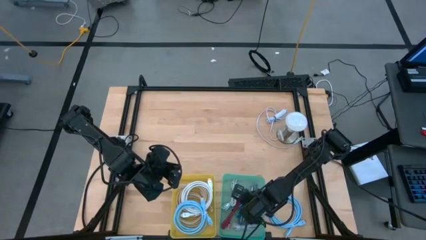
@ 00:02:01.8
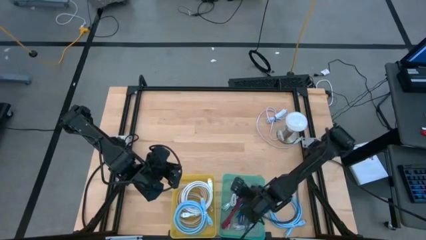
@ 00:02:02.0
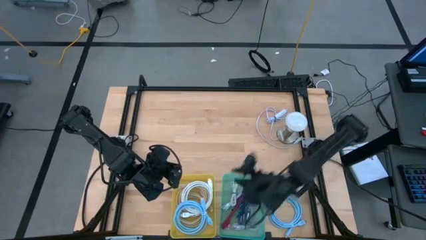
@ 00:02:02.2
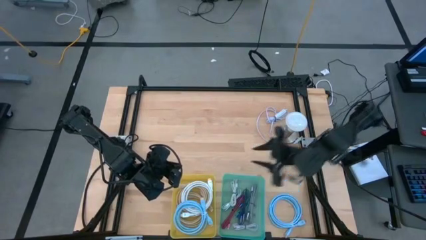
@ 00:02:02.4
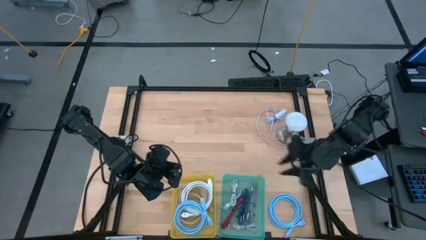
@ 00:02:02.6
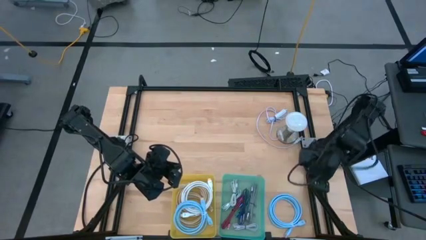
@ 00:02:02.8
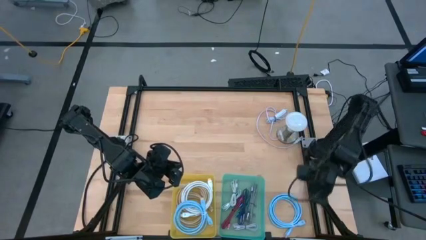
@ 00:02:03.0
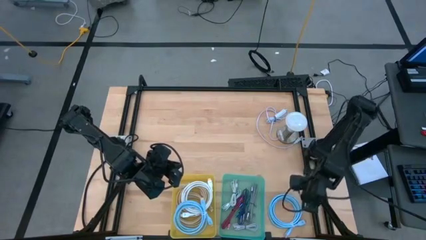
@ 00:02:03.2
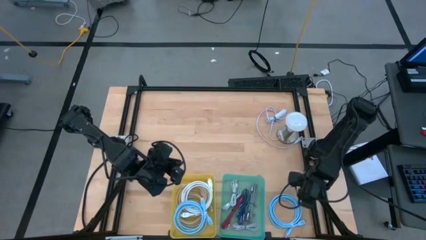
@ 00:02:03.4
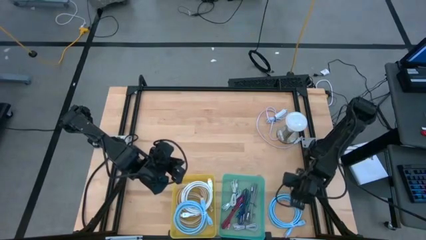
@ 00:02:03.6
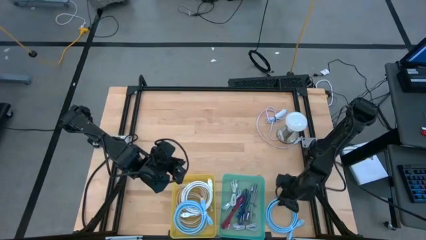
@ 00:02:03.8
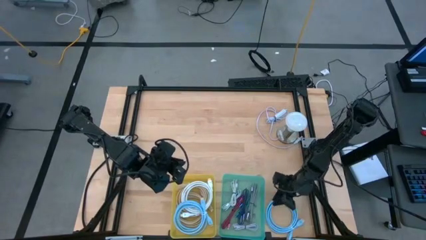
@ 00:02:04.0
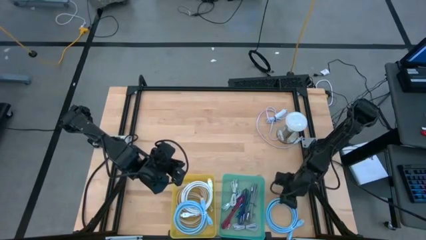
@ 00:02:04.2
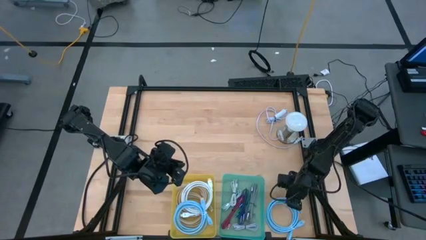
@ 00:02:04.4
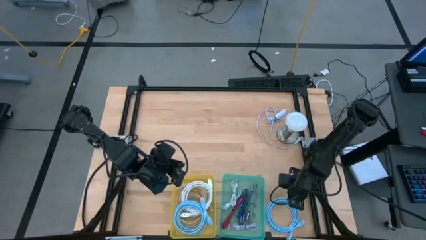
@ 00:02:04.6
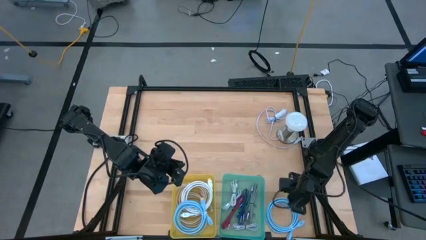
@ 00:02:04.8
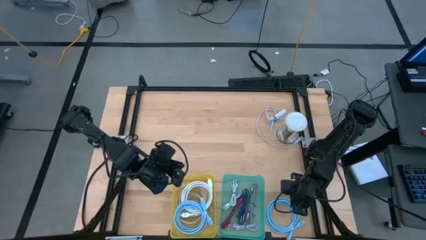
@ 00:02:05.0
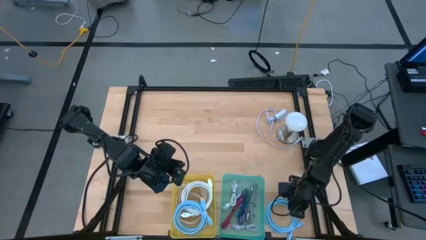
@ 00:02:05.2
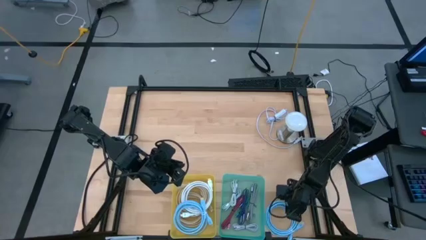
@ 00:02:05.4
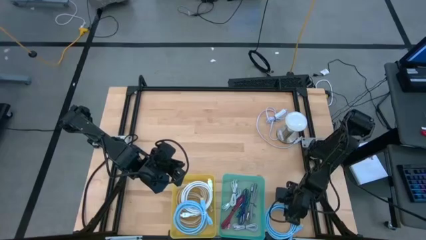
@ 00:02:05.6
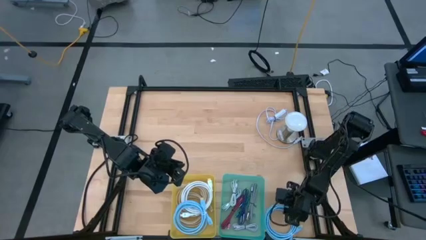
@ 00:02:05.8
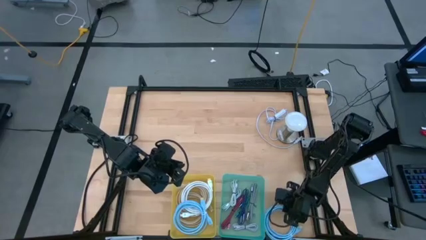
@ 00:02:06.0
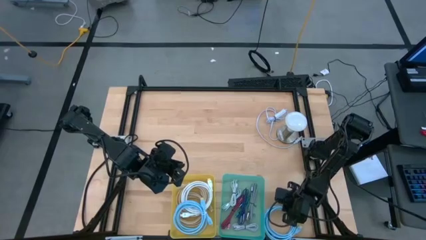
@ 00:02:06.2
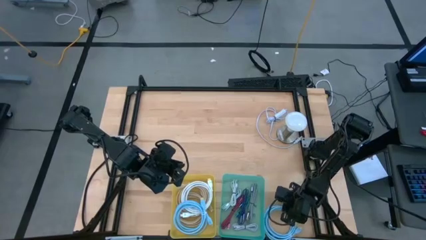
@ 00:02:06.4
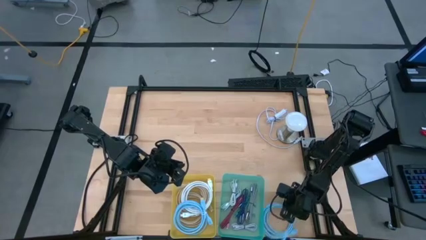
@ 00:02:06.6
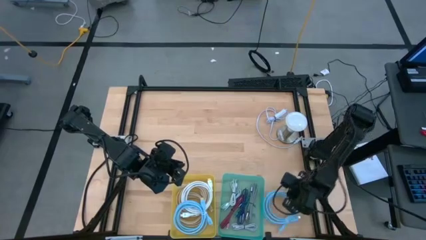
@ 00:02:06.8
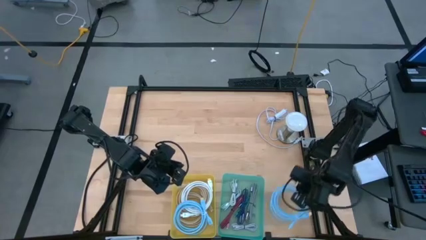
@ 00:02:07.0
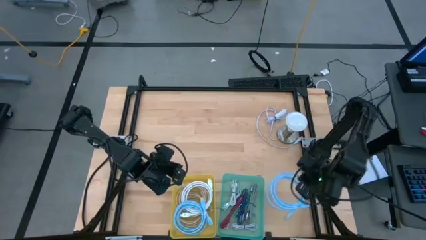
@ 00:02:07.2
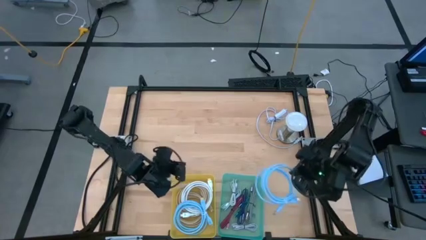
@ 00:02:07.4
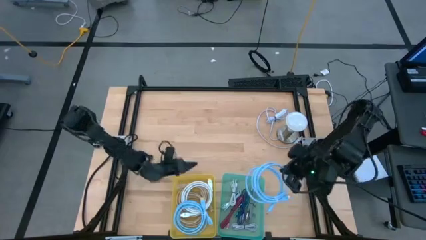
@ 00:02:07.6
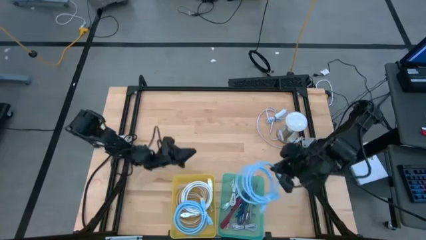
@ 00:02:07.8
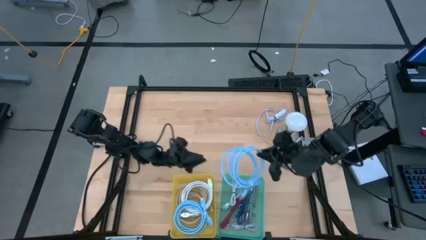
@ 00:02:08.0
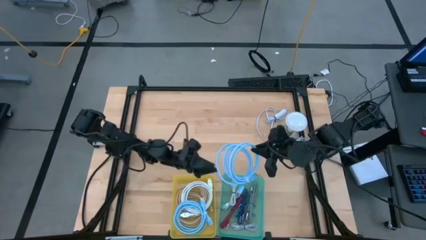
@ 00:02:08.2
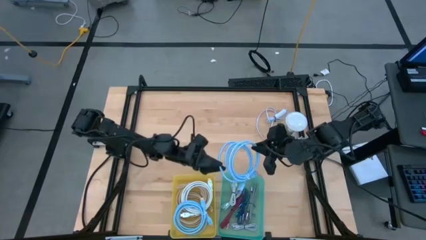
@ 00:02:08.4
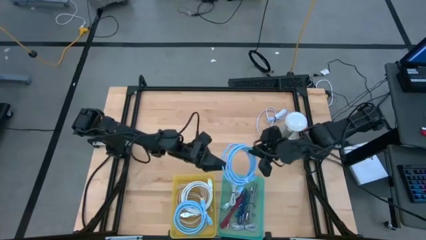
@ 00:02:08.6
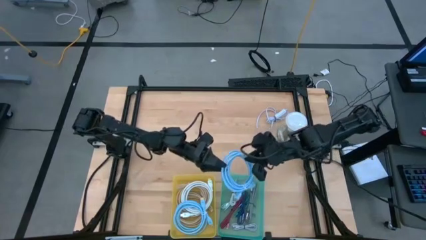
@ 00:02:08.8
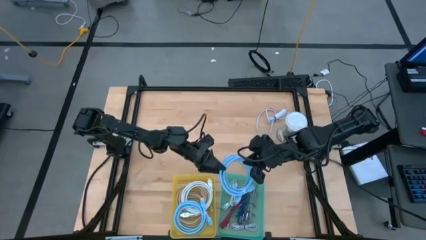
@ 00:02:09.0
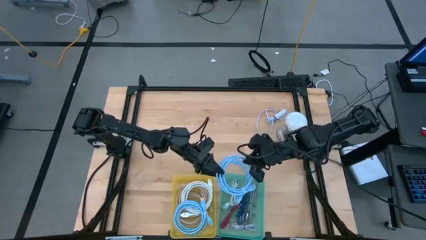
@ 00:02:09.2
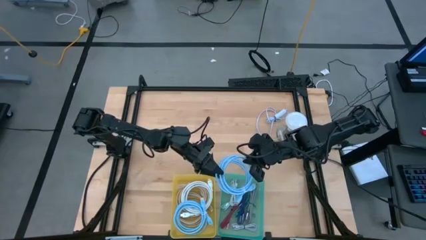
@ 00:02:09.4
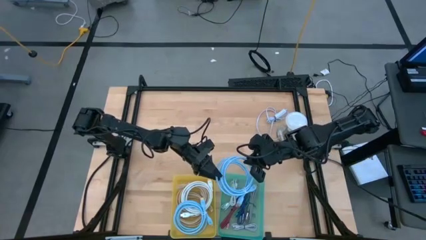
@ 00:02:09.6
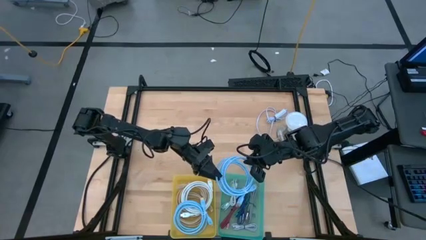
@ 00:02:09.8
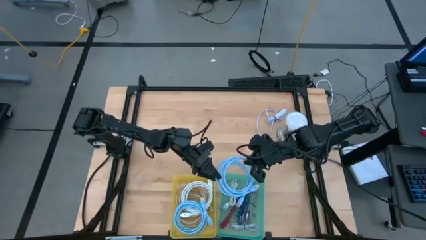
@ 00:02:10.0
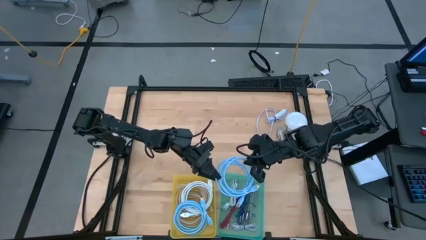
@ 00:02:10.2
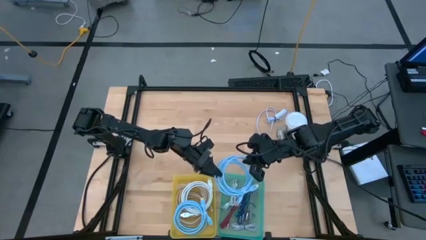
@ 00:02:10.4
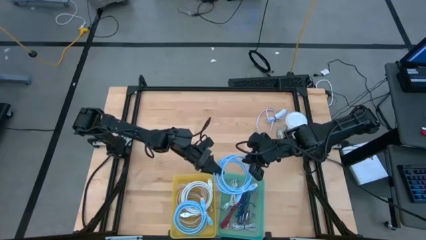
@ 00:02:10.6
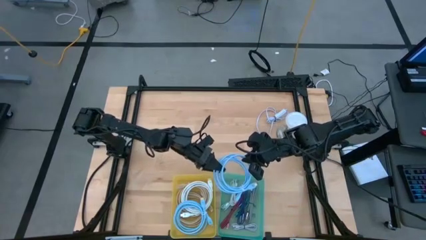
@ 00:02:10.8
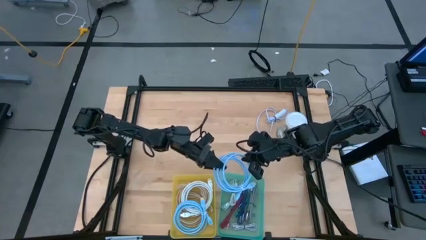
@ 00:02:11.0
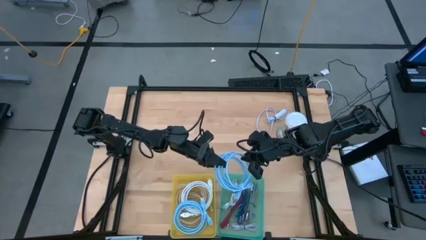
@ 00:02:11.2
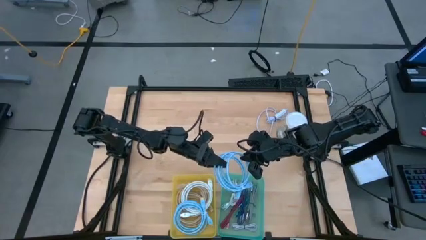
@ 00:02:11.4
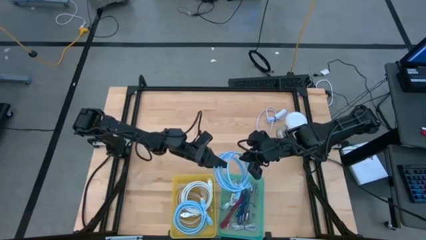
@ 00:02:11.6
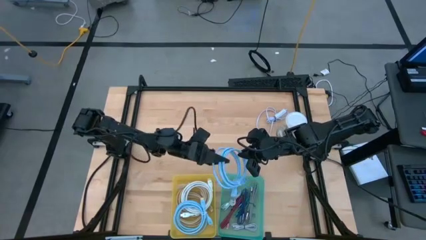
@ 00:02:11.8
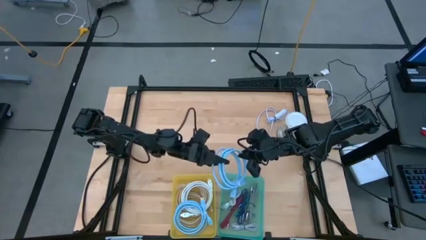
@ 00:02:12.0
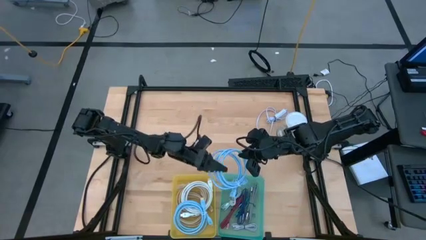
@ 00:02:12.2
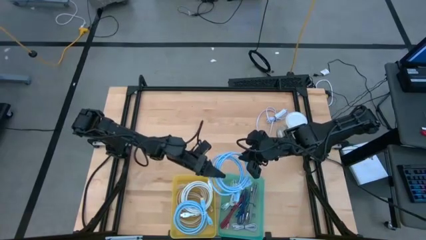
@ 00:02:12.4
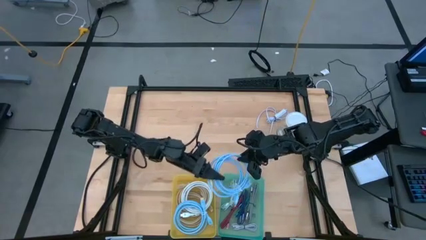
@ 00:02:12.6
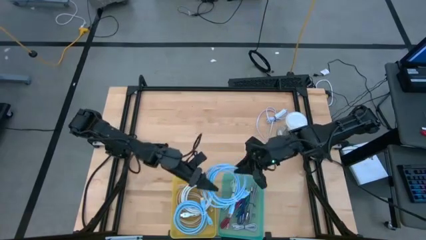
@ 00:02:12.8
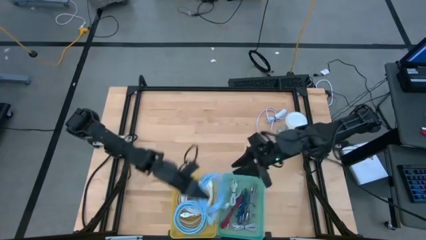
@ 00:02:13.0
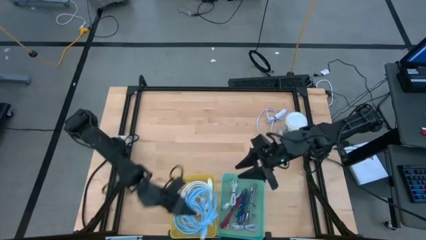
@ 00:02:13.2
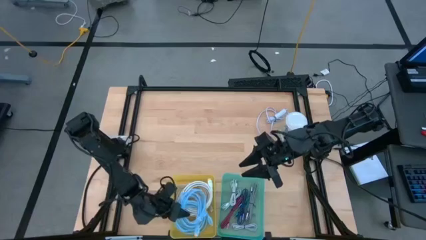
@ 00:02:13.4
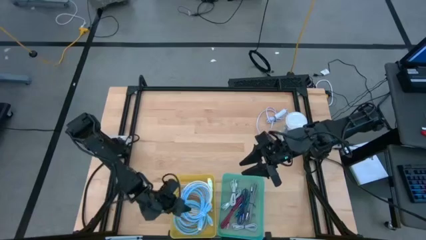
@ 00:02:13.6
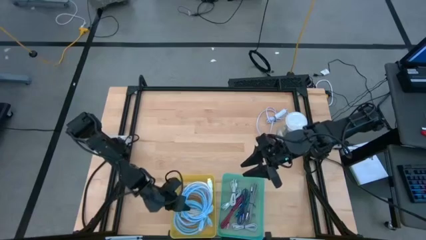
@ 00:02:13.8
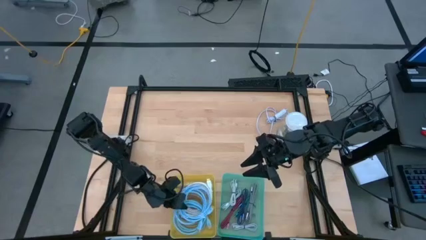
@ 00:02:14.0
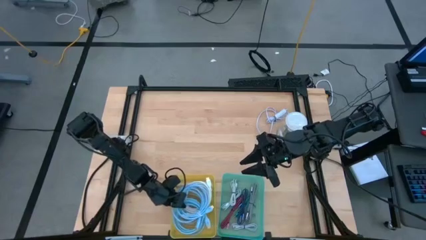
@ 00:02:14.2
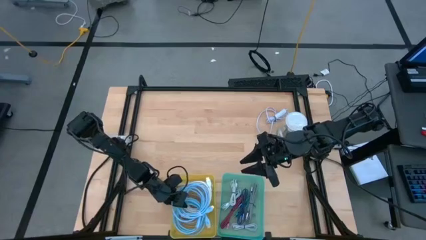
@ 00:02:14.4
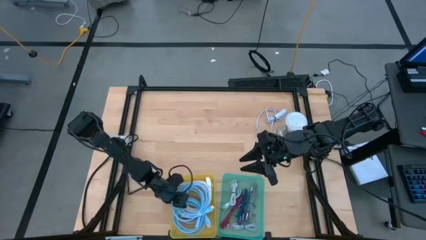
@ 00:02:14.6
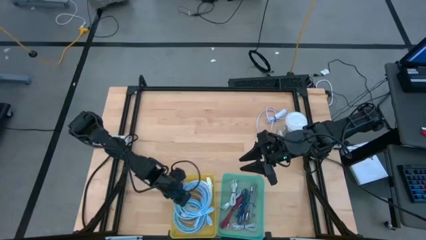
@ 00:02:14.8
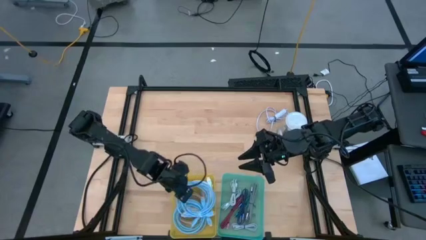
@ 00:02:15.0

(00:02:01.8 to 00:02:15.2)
Task: Pick & Place USB Port
Put the large blue charger into the yellow bin
